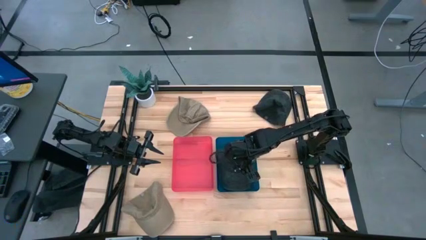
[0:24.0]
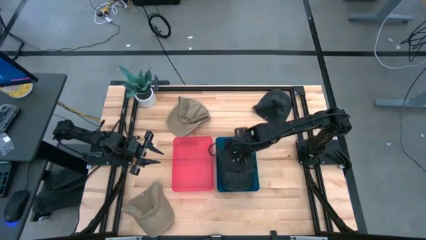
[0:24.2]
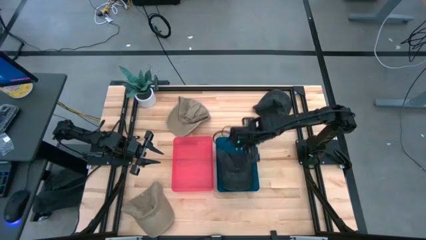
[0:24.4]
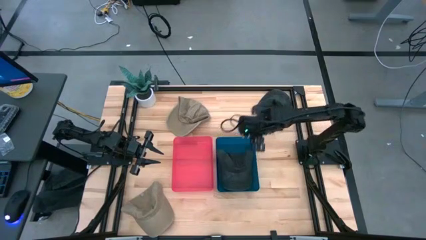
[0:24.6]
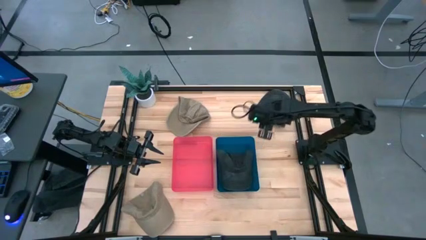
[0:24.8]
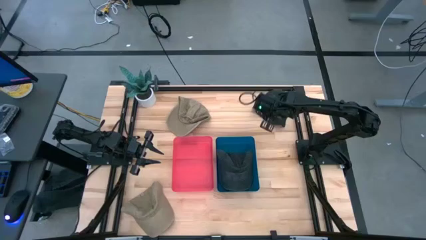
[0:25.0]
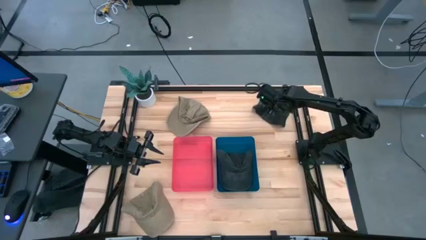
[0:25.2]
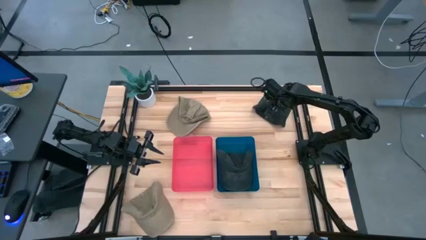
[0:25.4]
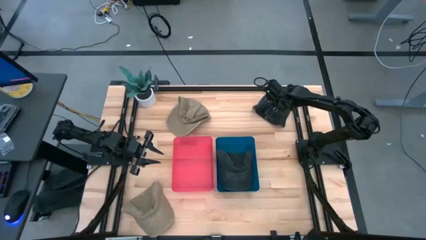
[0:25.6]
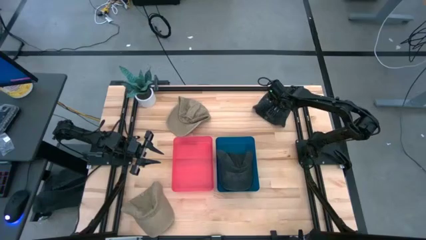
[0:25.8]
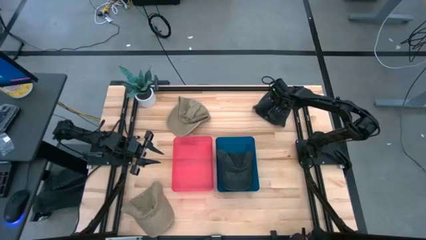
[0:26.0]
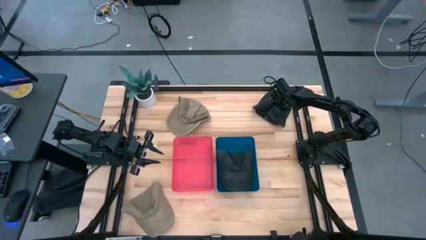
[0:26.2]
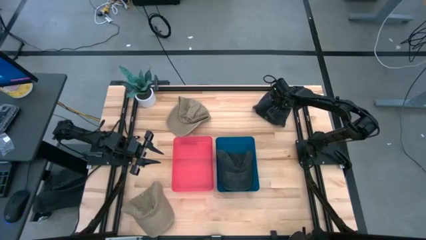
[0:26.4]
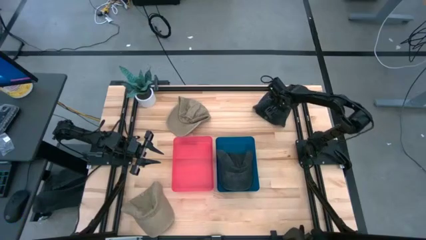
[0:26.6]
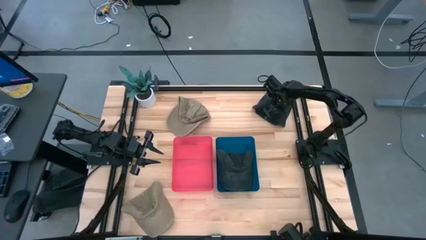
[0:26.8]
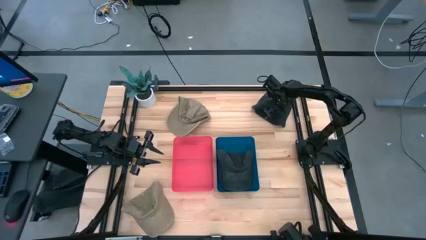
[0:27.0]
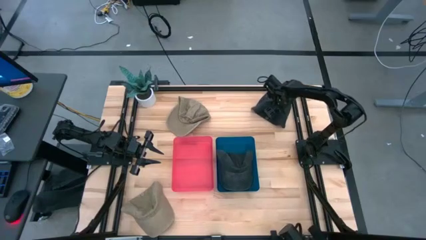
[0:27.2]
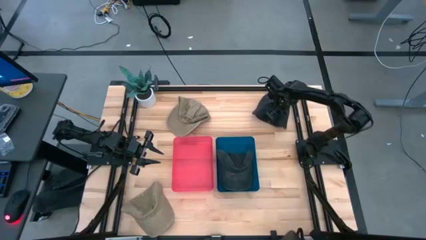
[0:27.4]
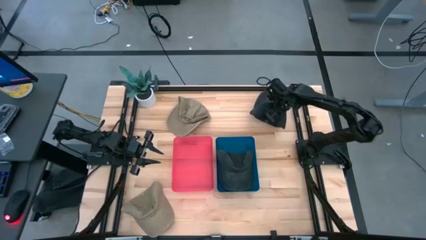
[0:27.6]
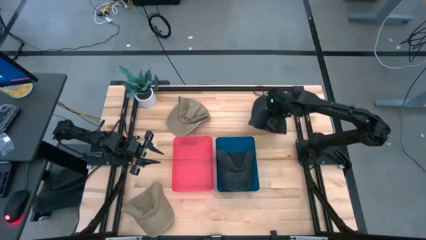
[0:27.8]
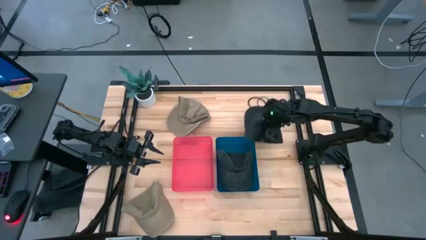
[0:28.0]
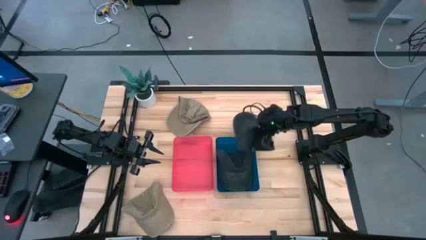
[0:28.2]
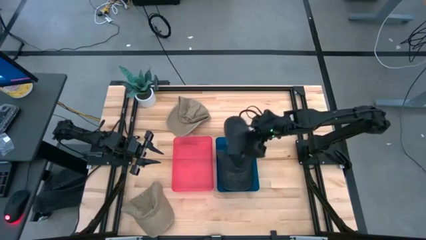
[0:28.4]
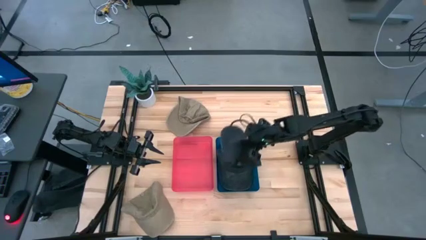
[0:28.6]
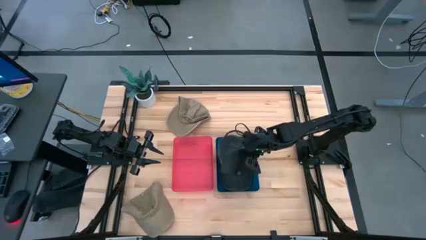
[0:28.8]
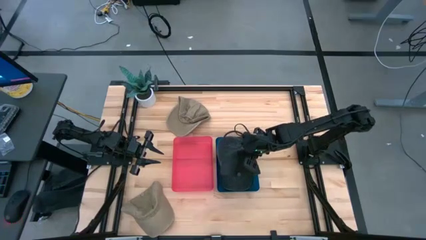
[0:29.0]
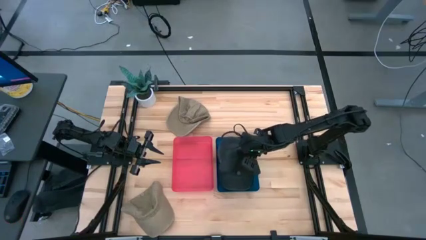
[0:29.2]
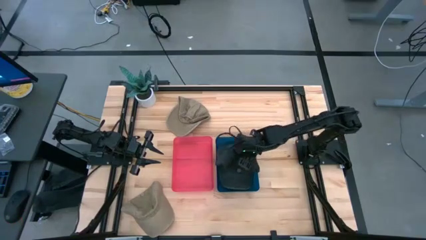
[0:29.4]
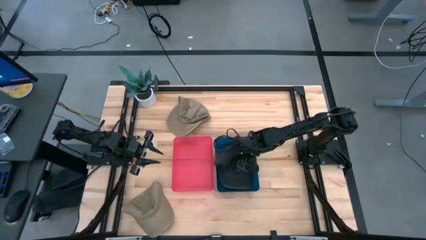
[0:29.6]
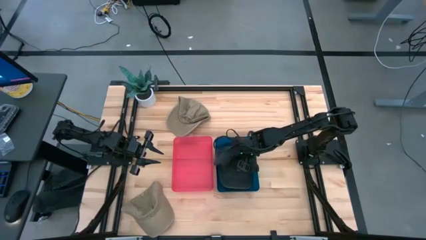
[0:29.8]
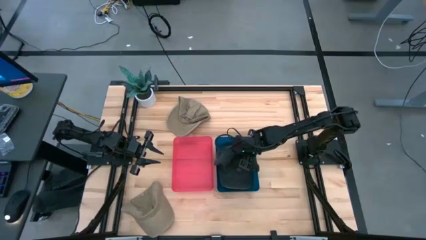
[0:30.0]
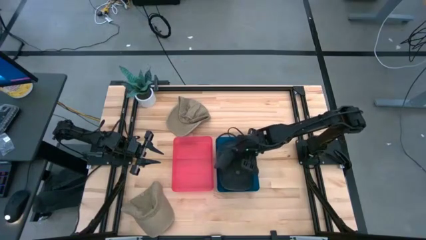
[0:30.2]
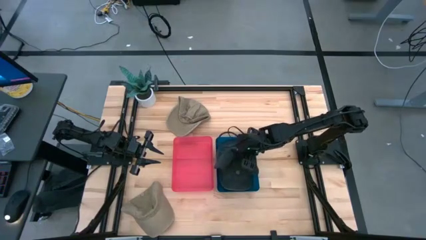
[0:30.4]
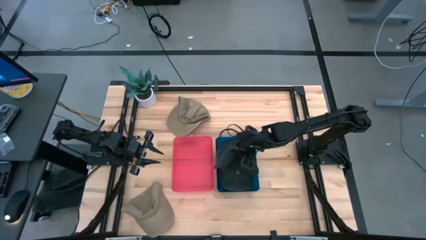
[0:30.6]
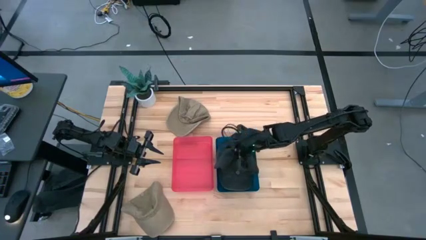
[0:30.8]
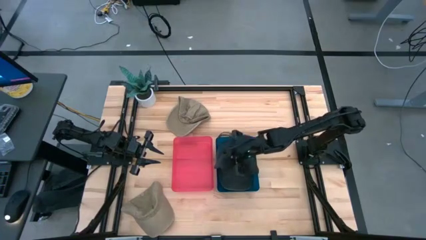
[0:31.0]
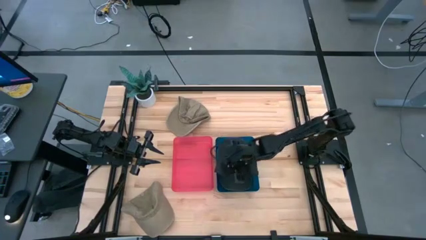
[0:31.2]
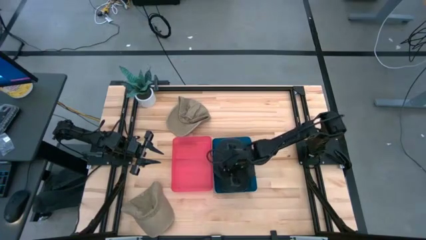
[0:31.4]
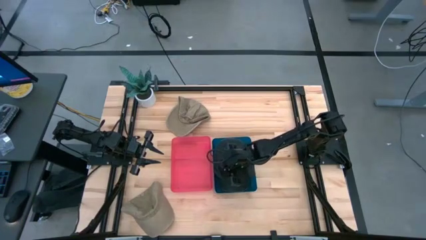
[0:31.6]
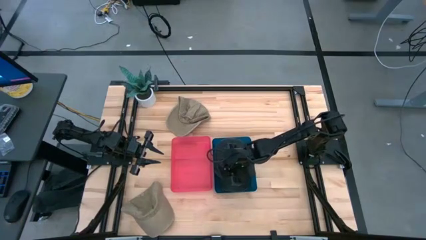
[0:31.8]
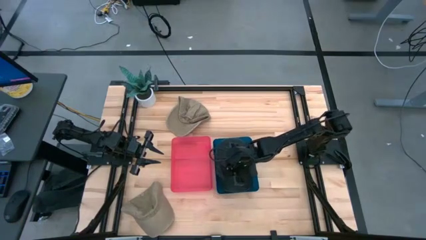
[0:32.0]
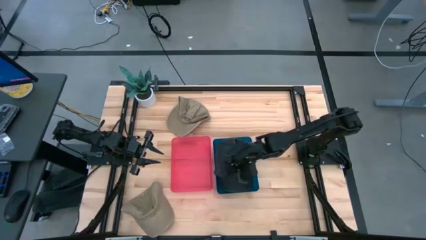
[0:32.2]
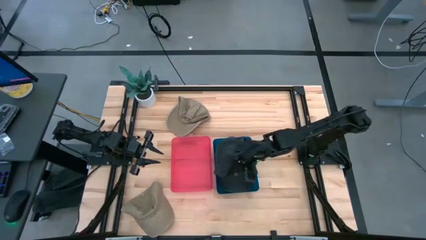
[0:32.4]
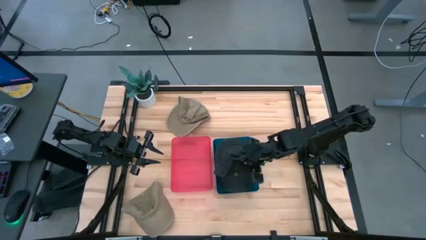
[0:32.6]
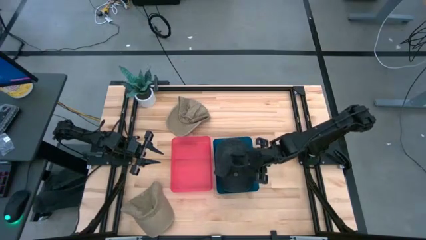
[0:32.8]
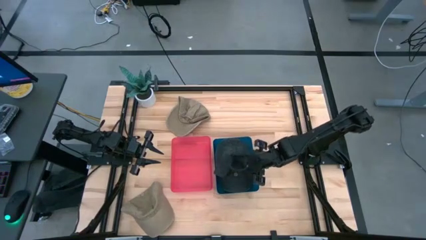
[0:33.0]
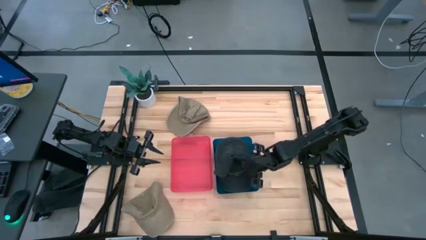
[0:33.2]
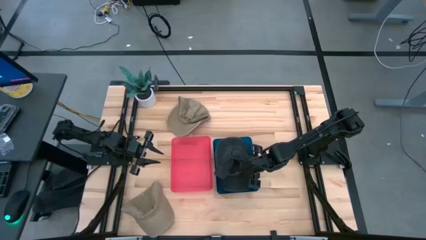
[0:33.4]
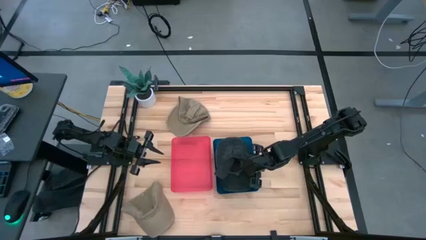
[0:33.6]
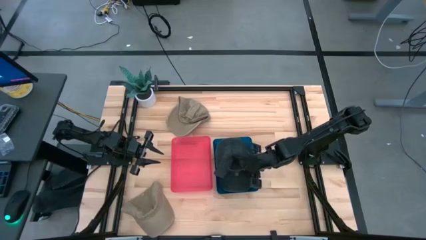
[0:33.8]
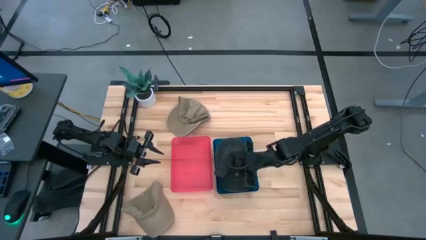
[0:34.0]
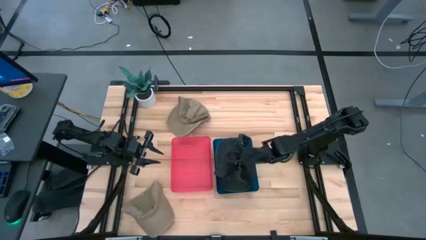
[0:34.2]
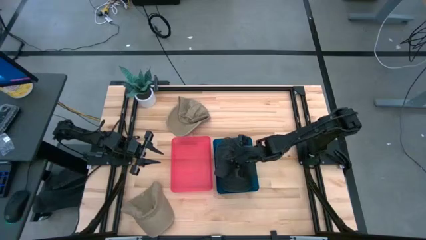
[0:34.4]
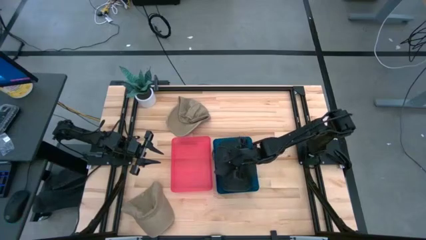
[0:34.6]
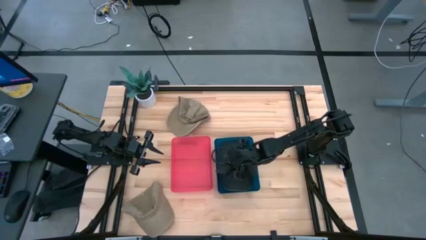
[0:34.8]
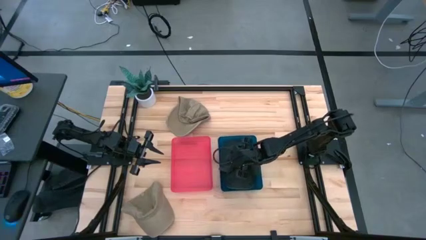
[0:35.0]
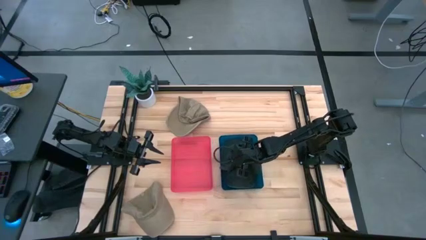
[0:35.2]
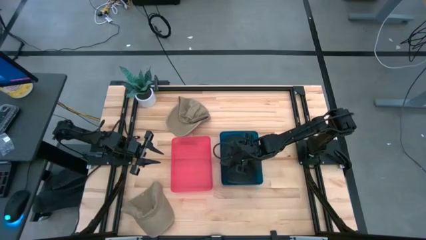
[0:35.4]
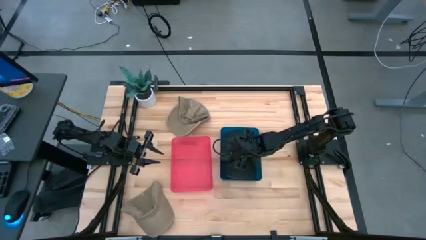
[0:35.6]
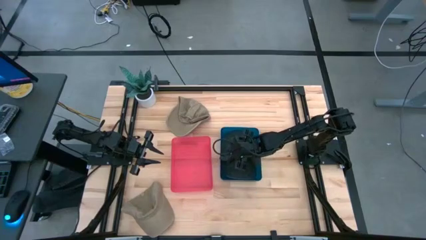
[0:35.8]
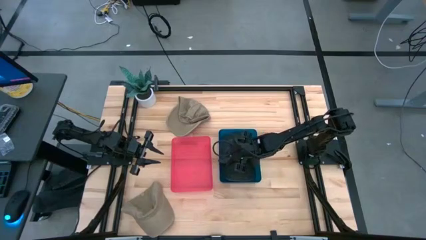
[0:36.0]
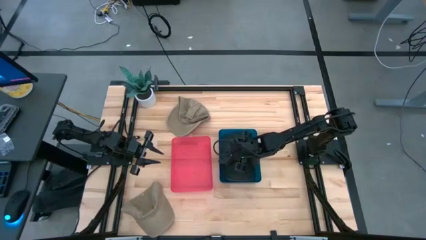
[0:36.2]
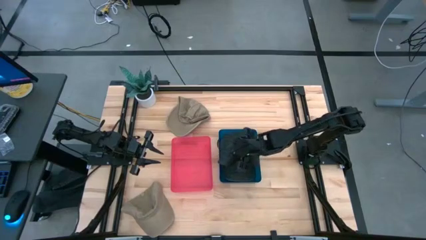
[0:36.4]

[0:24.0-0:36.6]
Task: Pick & Place hat
Put the black cap into the blue bin

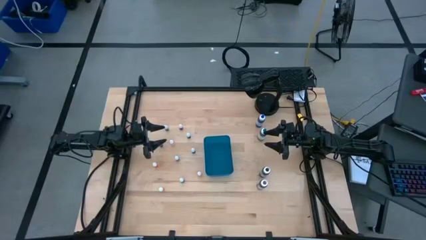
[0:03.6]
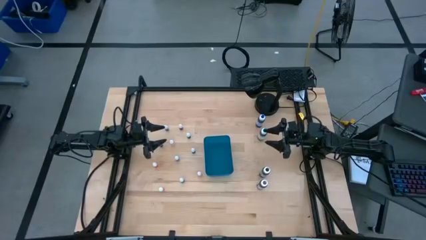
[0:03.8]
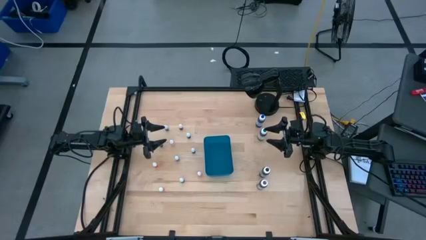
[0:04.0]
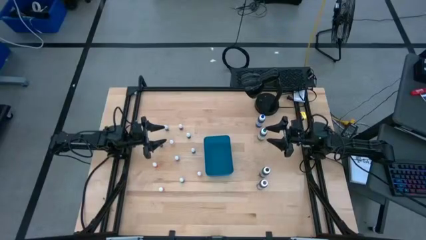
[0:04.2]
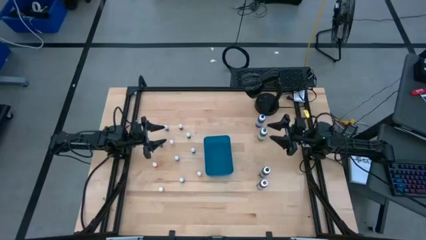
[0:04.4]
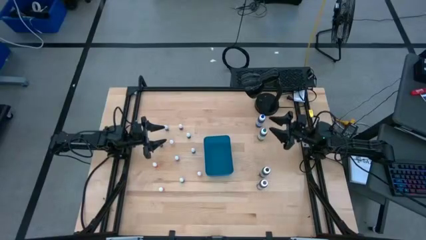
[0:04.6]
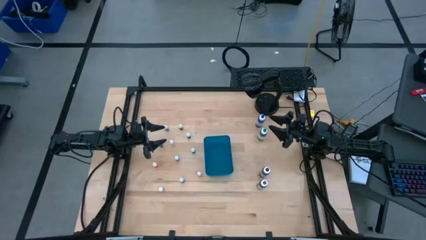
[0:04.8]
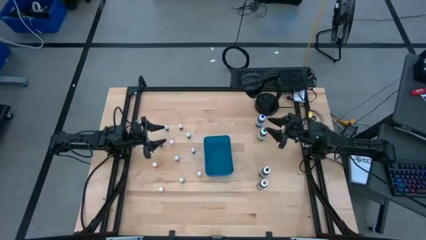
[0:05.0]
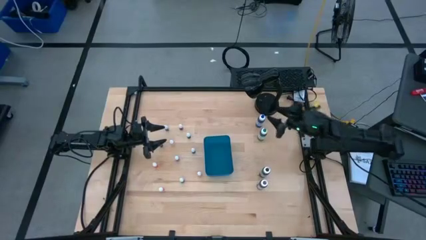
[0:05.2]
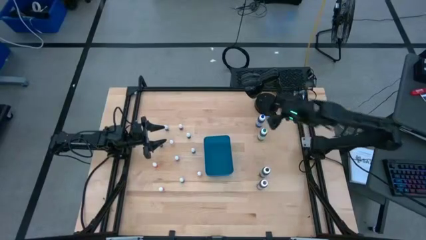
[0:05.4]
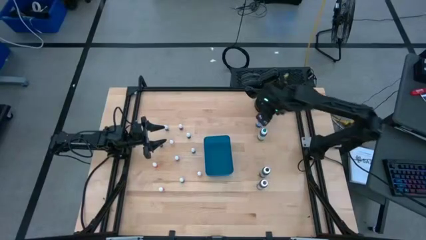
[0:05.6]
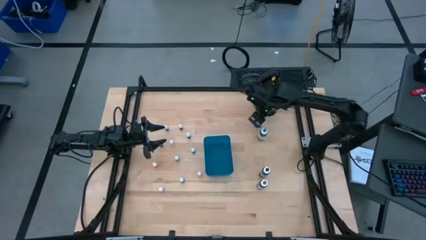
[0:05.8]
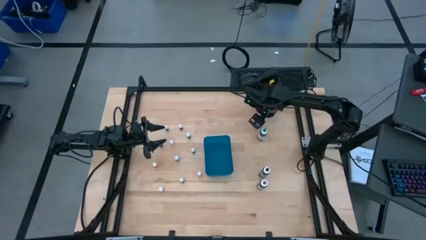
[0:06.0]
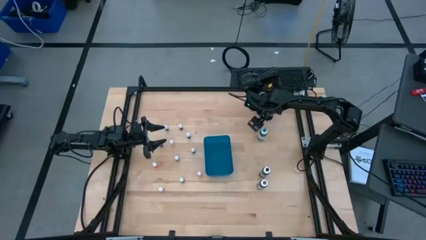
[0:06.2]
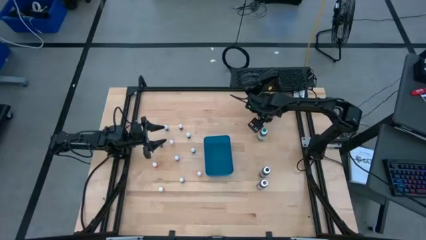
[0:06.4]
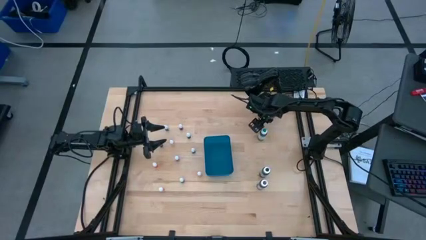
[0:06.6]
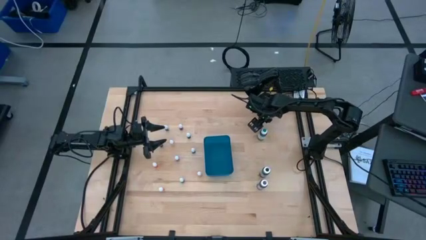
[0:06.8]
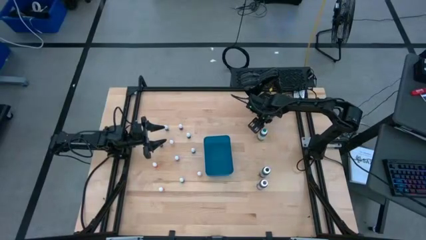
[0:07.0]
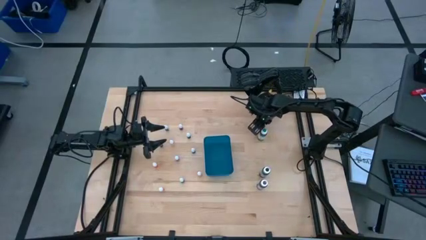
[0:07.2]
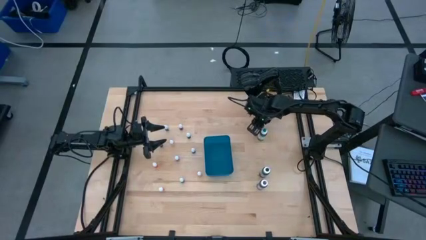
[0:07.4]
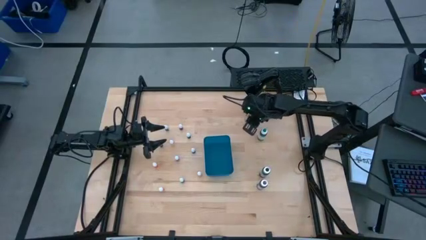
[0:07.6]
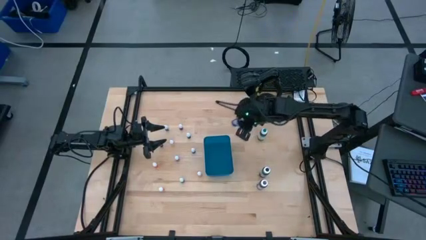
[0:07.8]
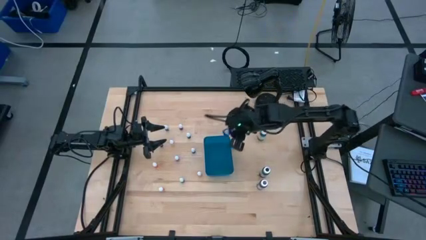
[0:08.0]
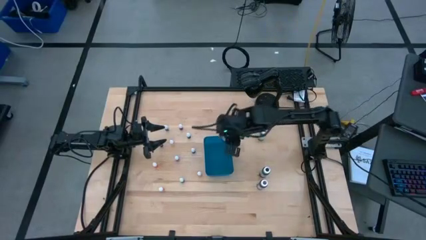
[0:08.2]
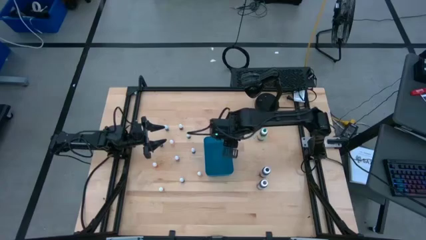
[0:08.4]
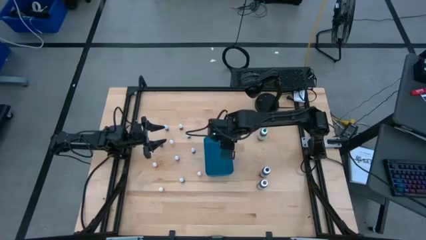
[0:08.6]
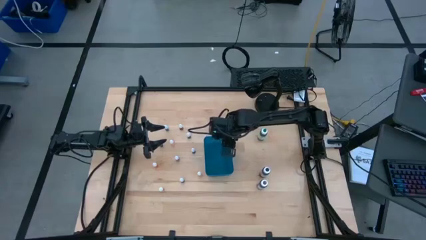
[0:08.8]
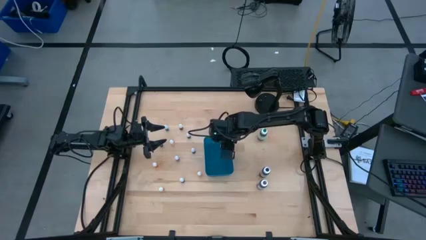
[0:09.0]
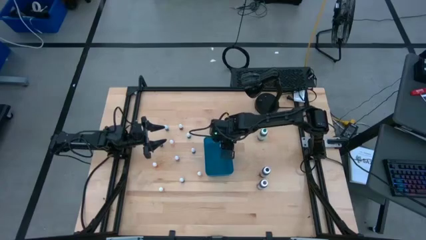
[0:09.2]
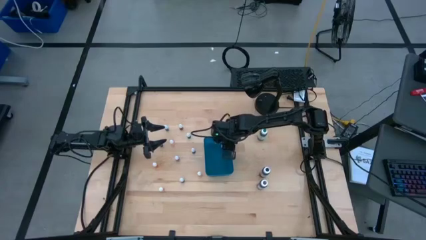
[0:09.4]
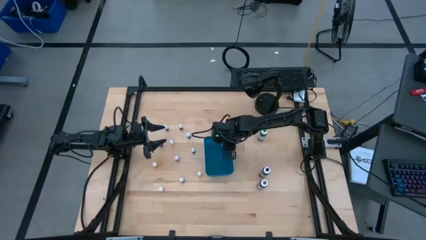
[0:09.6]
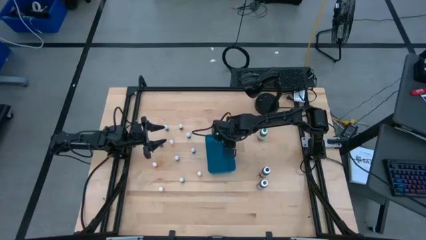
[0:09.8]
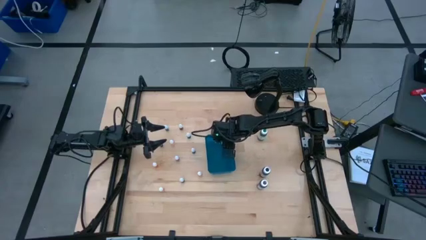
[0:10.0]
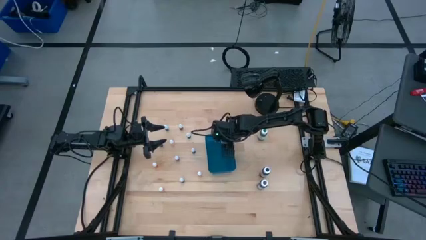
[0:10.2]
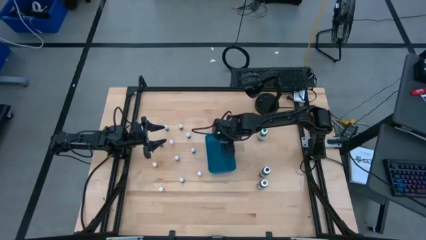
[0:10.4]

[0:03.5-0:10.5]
Task: Pick & Place food coloring
Put the large blue food coloring bottle into the blue container
